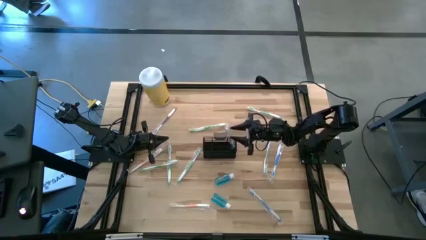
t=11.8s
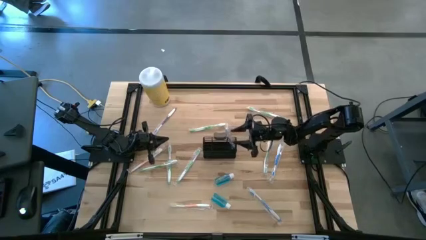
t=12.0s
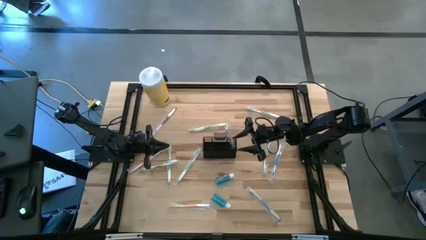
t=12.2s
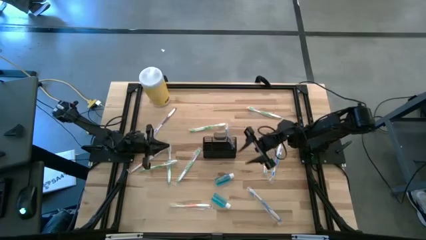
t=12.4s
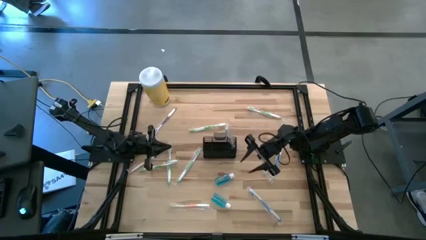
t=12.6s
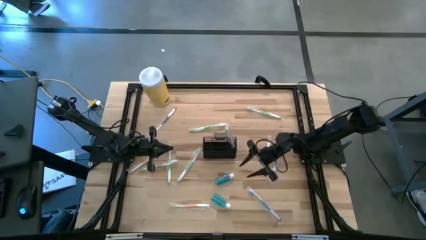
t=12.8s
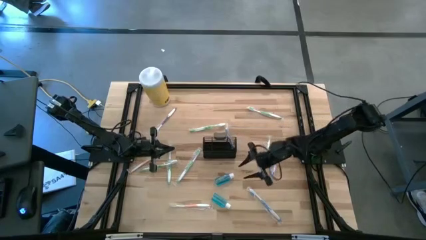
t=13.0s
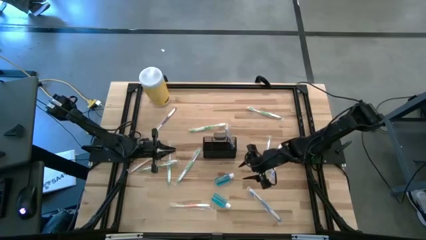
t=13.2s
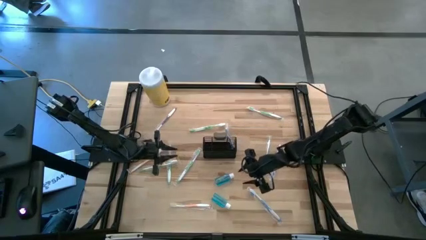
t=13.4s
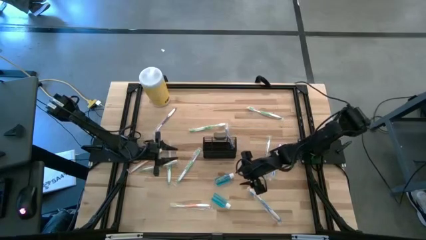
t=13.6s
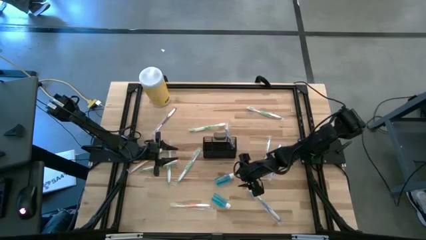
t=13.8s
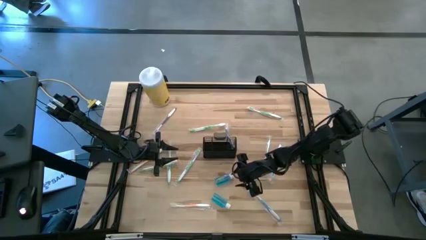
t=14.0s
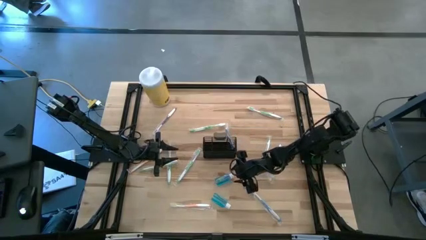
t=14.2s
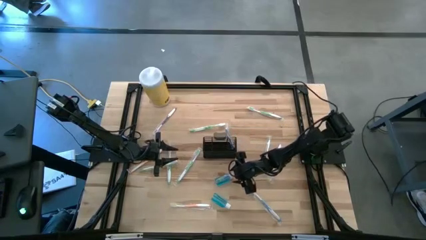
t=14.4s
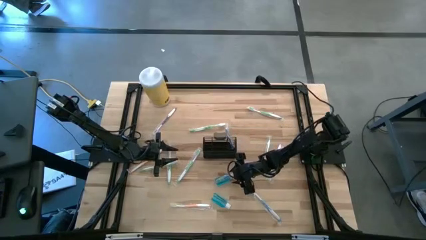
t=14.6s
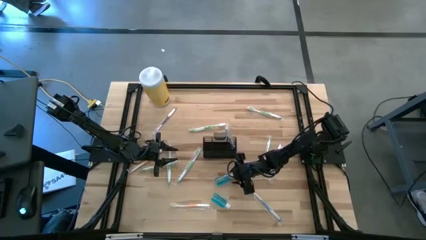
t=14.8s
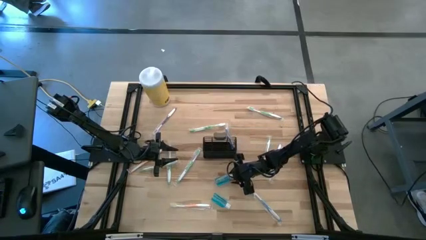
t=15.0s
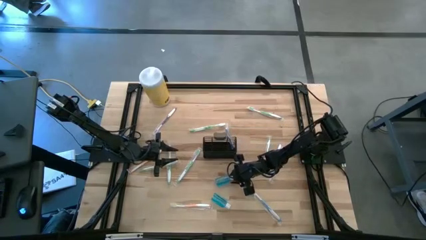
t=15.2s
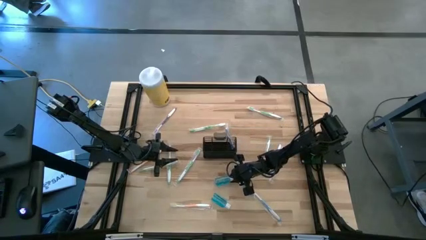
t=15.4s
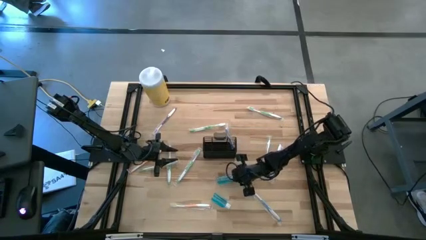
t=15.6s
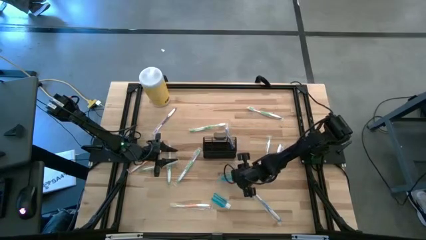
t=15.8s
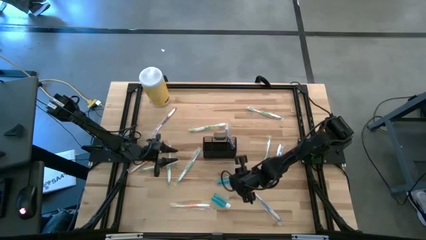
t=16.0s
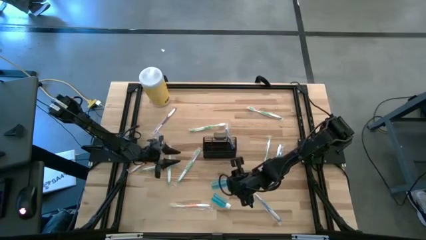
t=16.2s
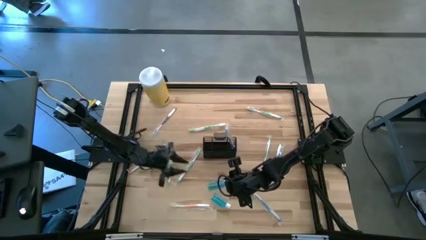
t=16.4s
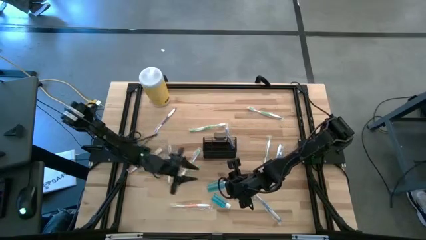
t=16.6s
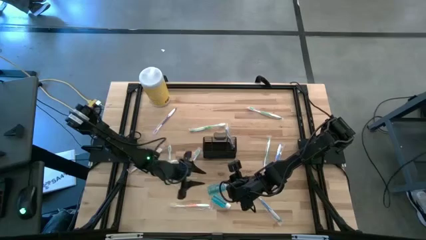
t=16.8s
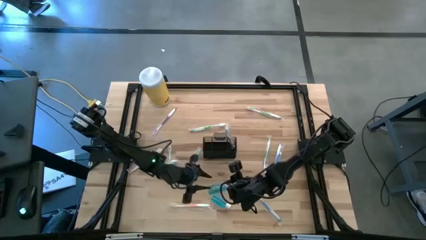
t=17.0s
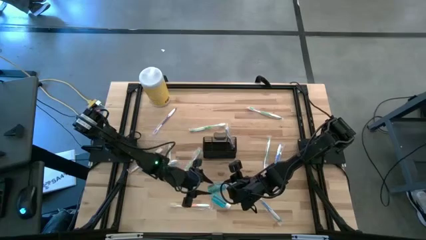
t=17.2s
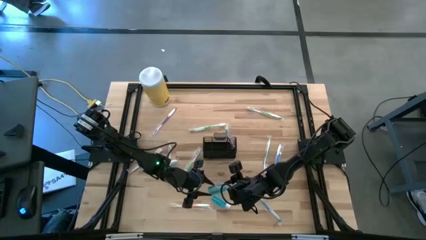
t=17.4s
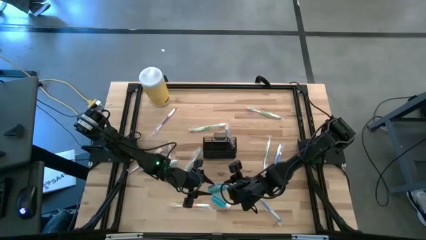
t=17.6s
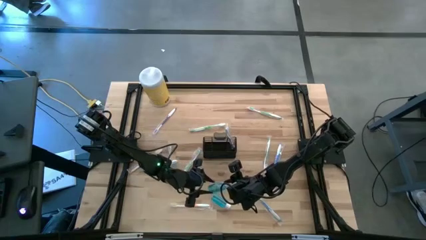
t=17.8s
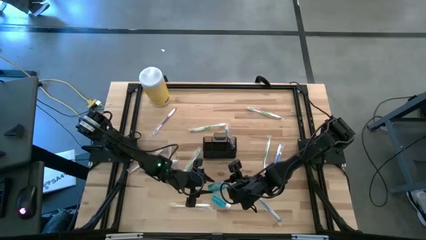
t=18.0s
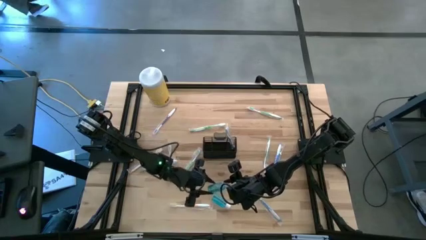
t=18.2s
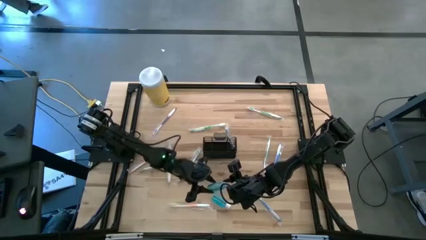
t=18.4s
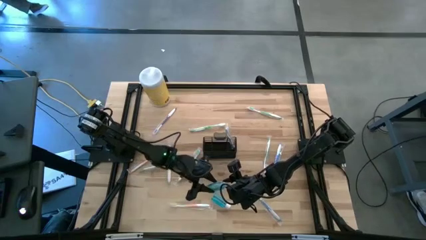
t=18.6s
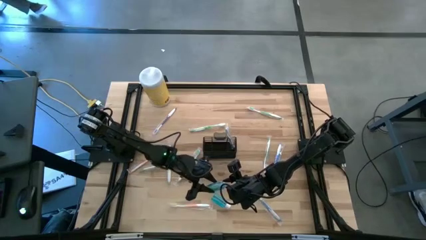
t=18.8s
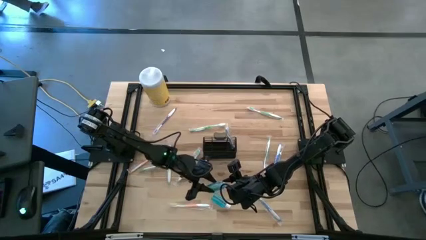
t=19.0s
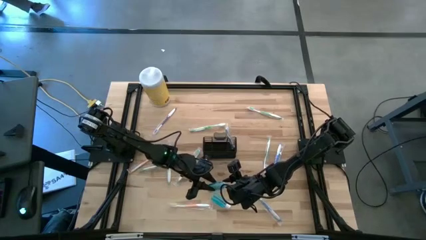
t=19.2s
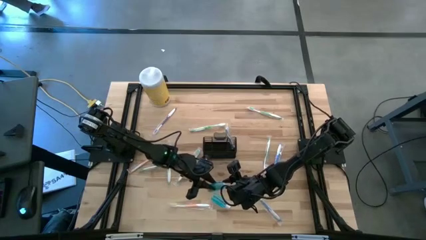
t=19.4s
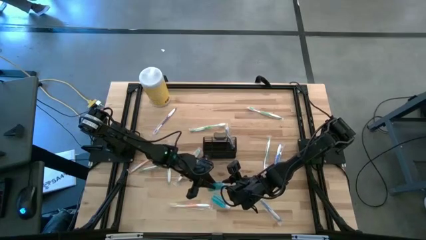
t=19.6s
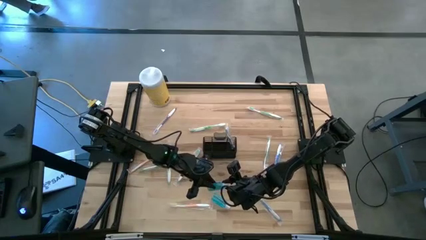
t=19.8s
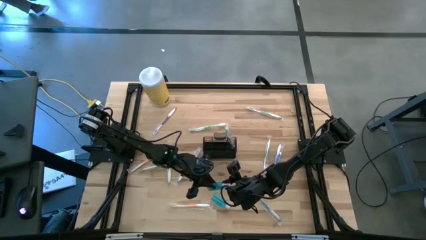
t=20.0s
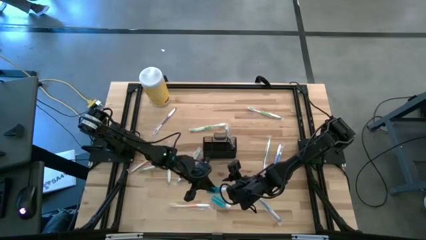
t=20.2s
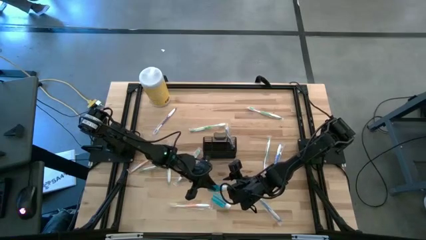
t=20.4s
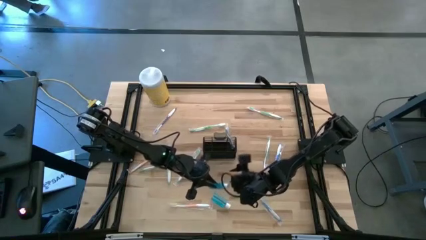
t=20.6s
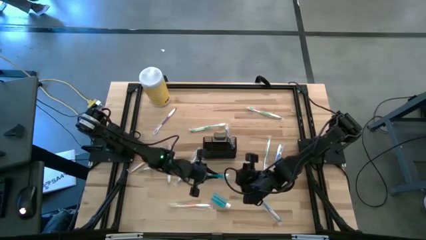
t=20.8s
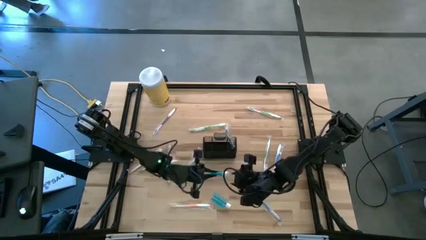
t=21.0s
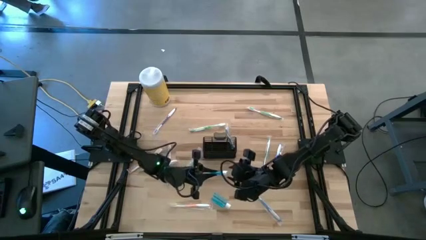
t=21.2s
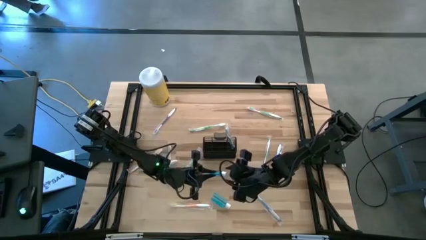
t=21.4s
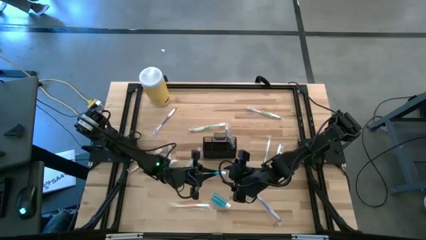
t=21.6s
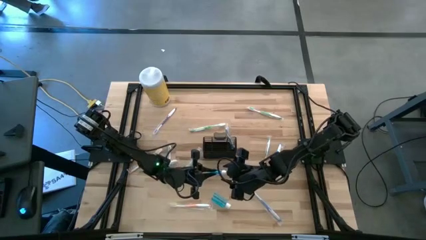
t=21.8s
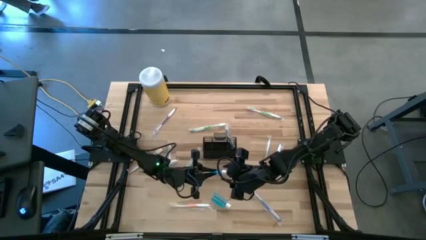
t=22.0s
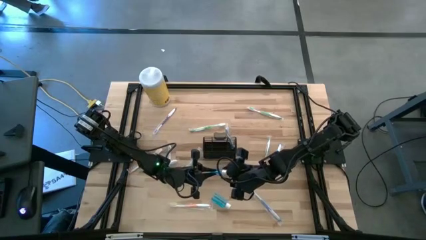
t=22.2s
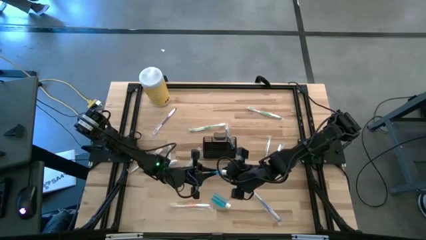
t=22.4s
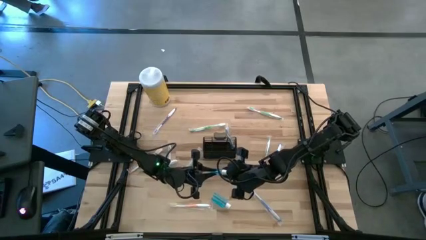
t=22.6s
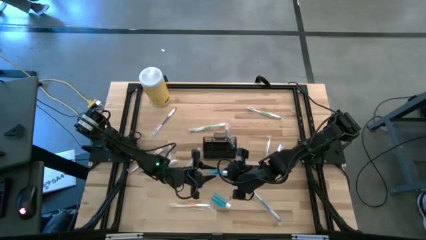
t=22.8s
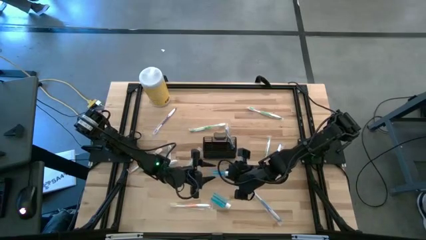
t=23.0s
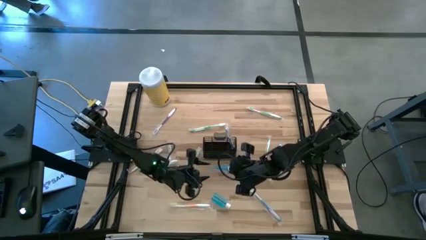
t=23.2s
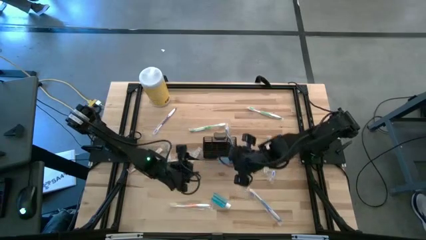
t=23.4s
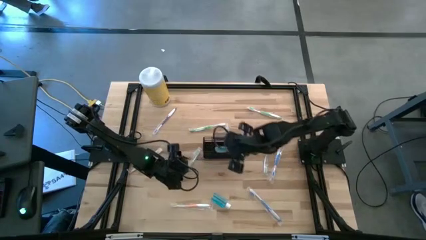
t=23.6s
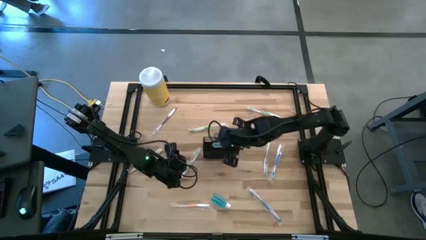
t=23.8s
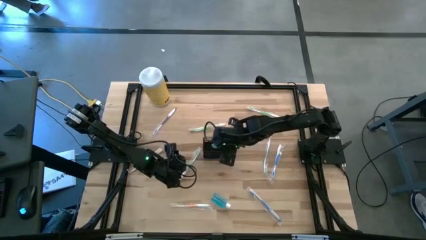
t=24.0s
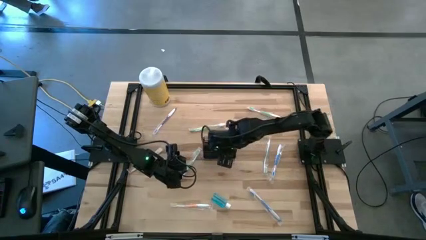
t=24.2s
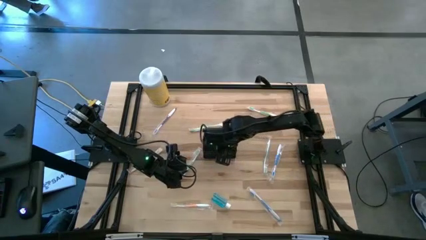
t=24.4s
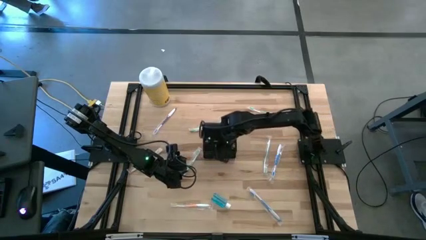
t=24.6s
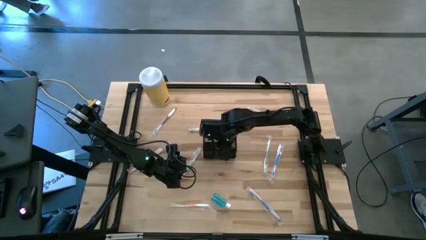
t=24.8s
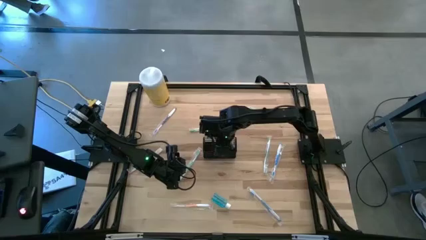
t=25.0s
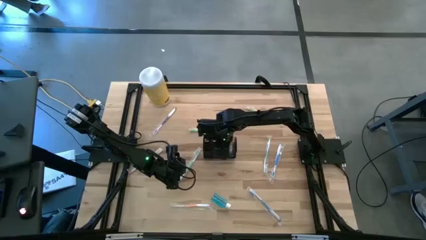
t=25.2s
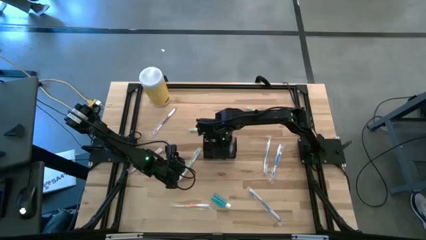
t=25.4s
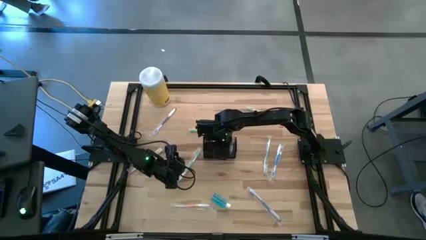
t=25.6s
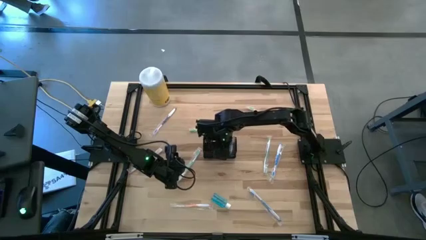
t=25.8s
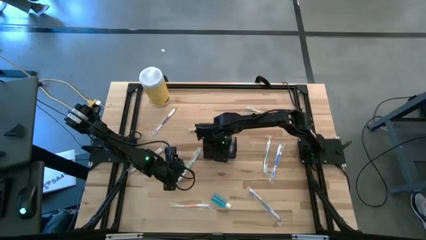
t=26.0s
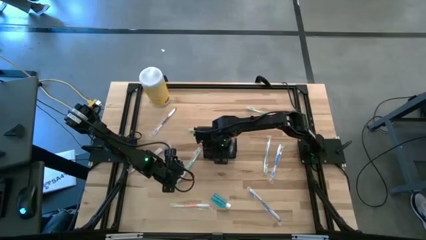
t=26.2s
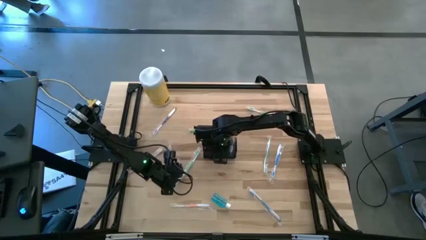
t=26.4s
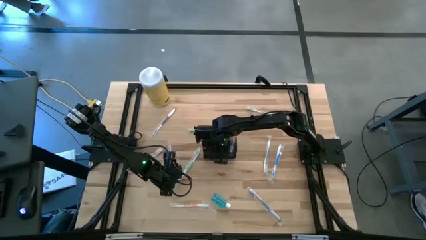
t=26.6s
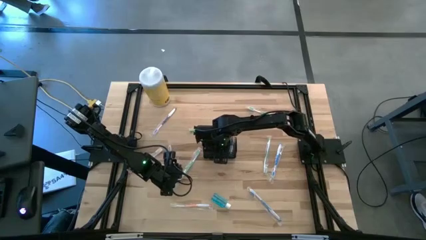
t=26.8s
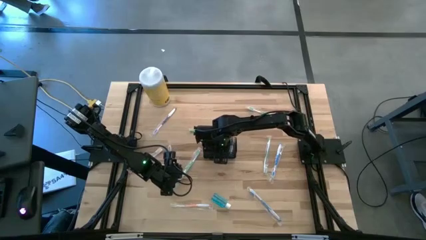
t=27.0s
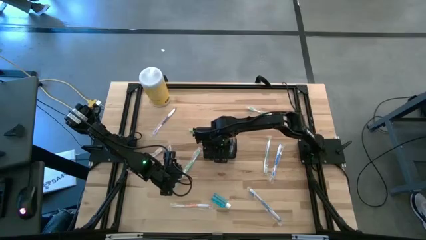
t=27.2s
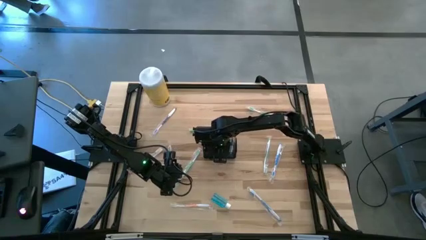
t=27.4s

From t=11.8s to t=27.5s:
Task: Pick & Place toothbrushing station
Put the mouthwash into the wire organizer
